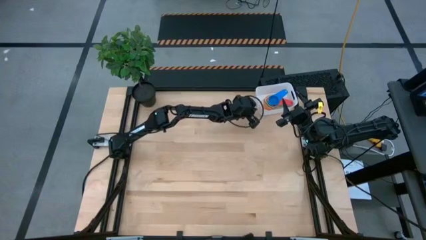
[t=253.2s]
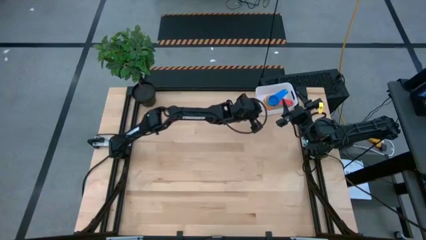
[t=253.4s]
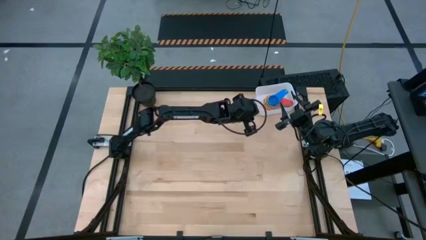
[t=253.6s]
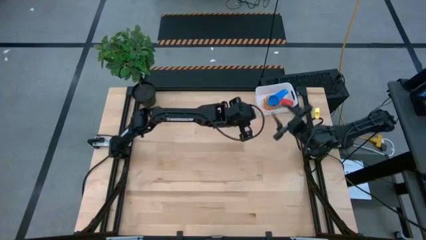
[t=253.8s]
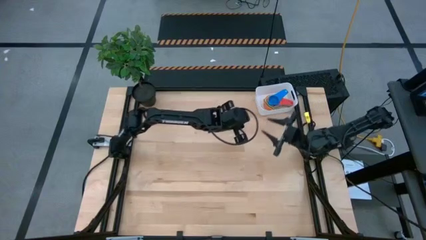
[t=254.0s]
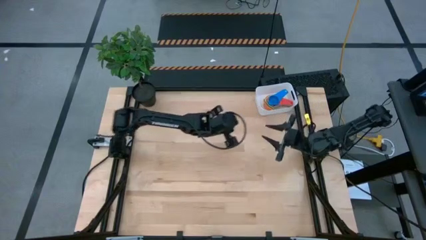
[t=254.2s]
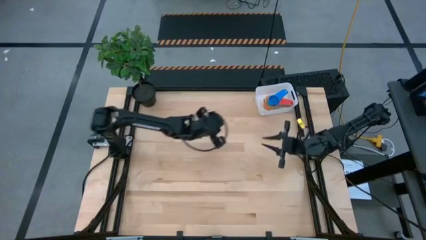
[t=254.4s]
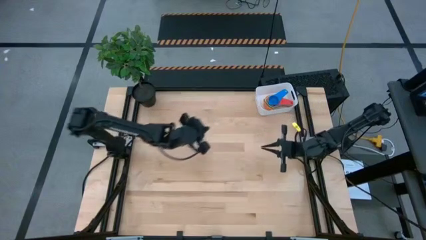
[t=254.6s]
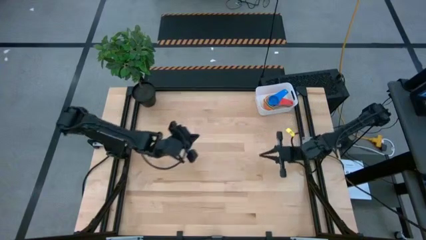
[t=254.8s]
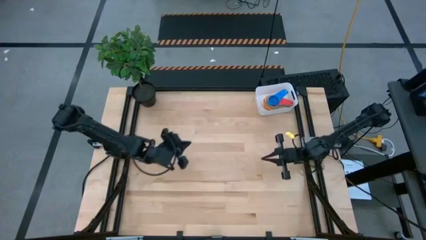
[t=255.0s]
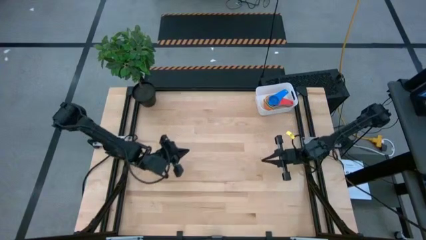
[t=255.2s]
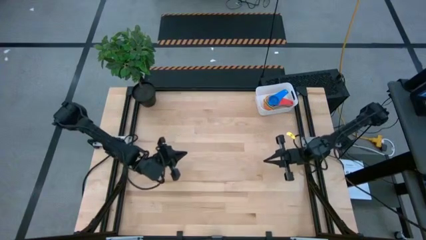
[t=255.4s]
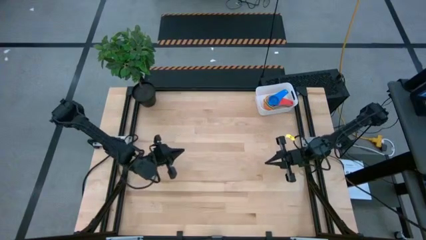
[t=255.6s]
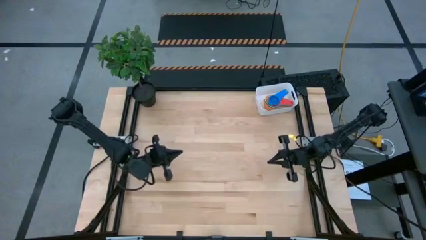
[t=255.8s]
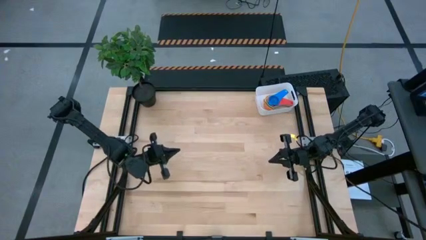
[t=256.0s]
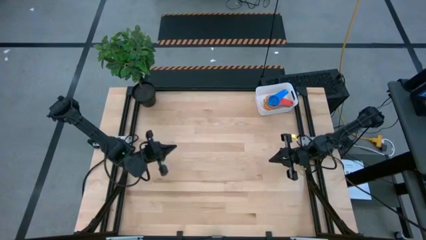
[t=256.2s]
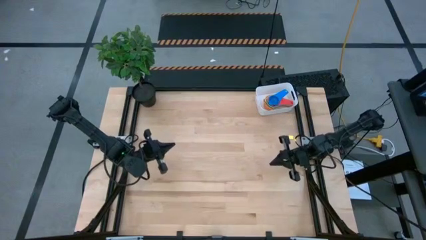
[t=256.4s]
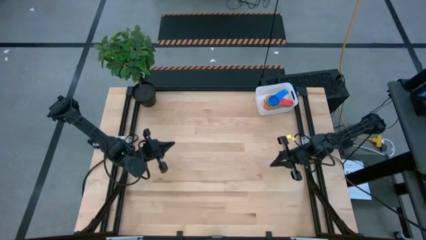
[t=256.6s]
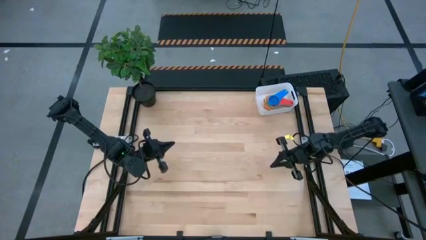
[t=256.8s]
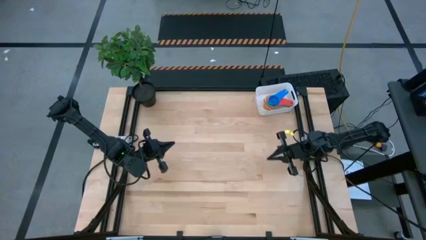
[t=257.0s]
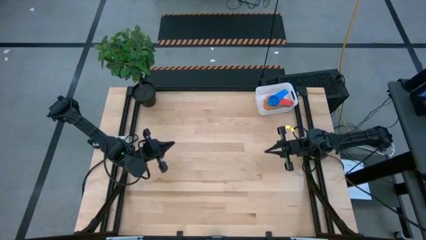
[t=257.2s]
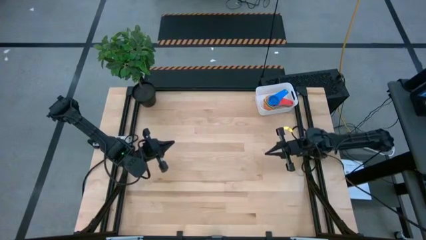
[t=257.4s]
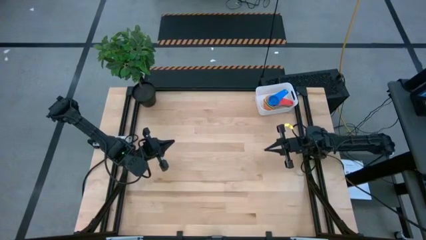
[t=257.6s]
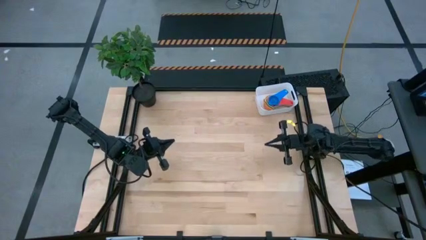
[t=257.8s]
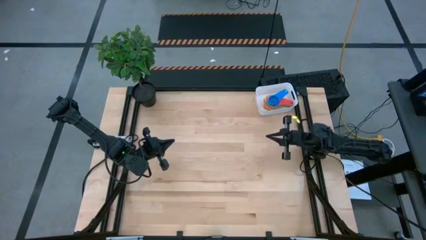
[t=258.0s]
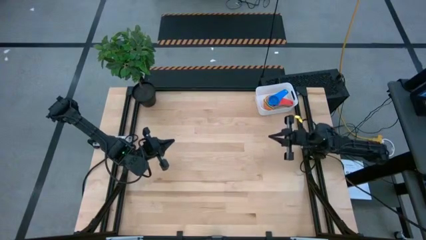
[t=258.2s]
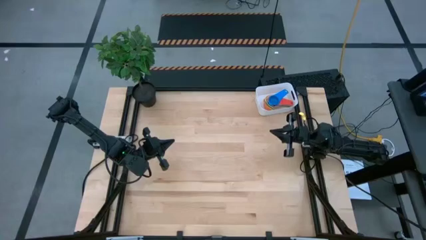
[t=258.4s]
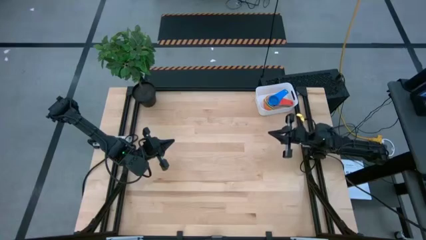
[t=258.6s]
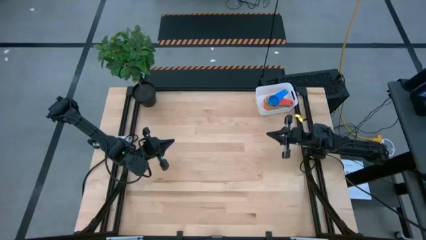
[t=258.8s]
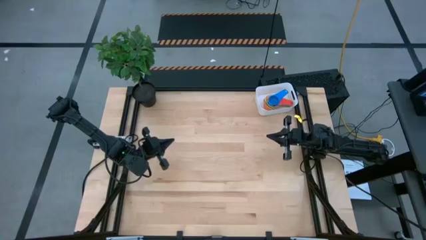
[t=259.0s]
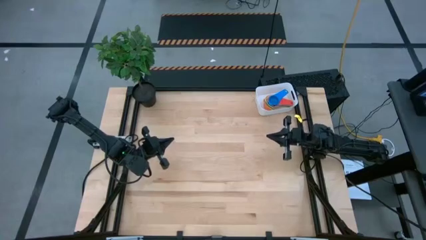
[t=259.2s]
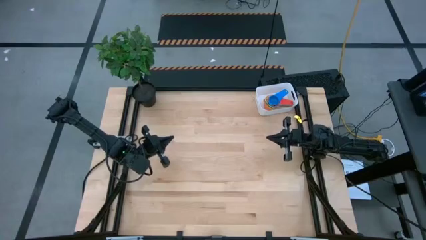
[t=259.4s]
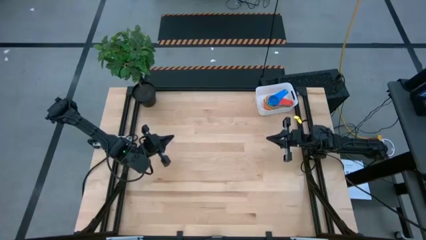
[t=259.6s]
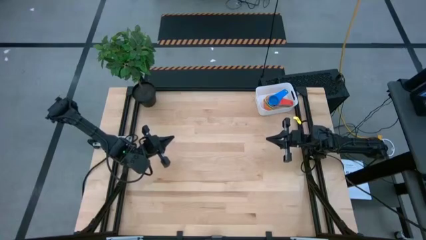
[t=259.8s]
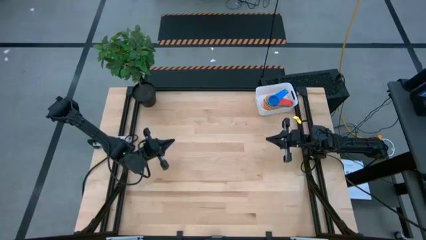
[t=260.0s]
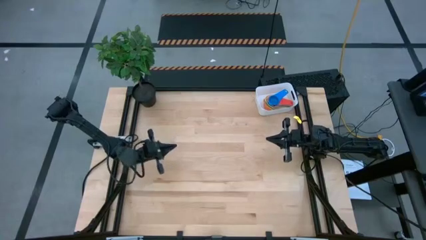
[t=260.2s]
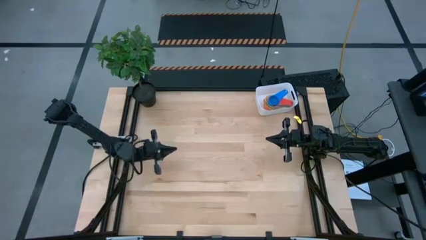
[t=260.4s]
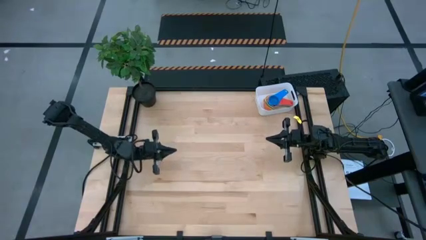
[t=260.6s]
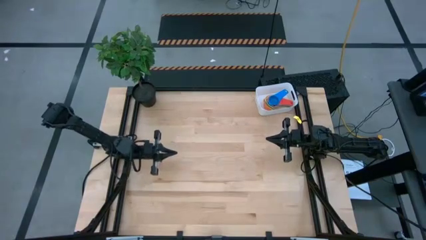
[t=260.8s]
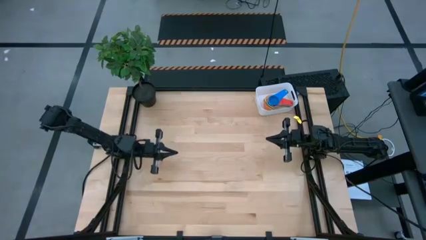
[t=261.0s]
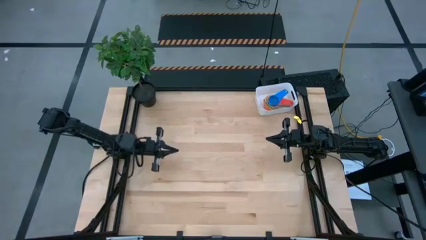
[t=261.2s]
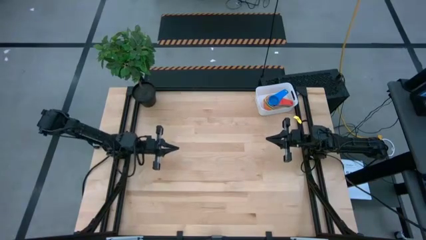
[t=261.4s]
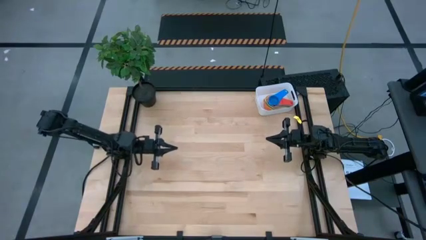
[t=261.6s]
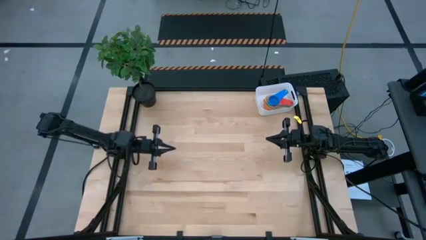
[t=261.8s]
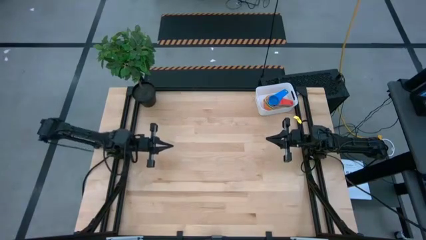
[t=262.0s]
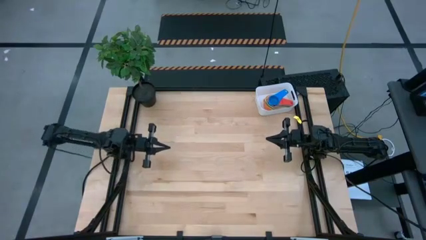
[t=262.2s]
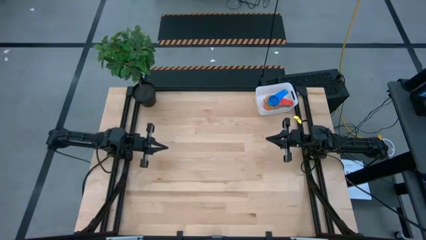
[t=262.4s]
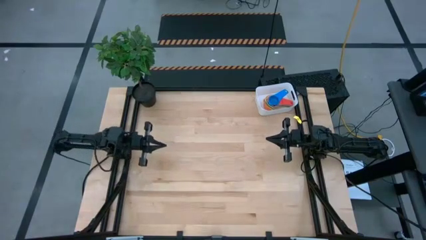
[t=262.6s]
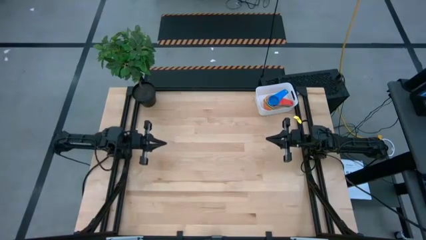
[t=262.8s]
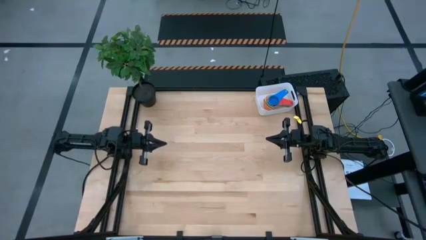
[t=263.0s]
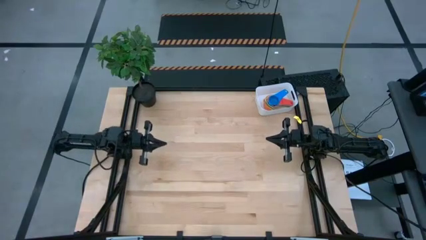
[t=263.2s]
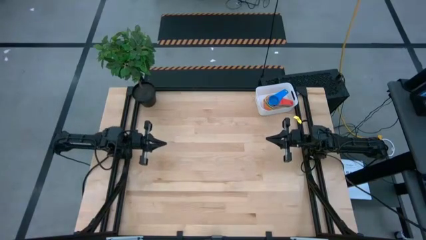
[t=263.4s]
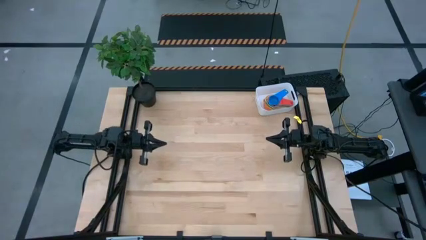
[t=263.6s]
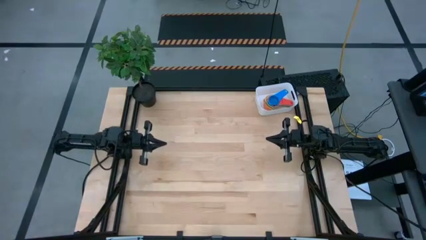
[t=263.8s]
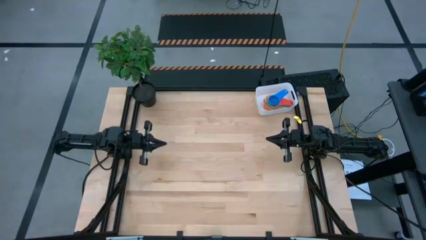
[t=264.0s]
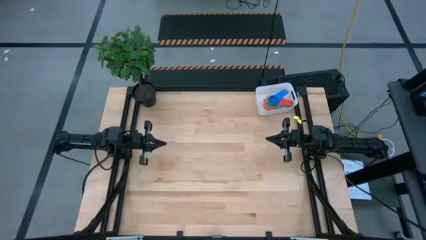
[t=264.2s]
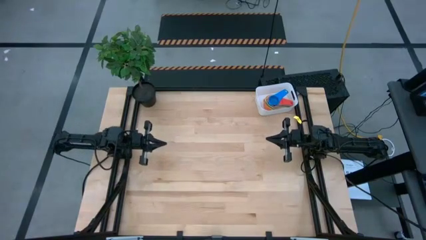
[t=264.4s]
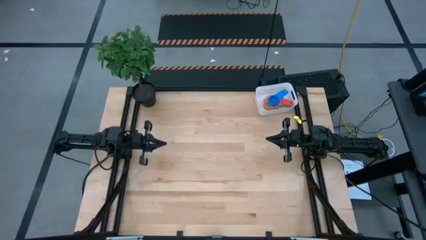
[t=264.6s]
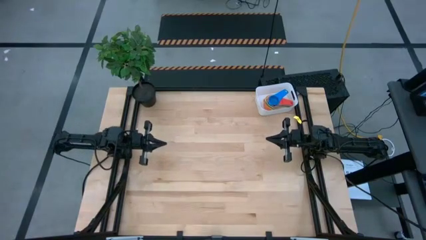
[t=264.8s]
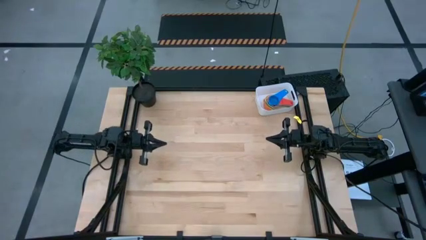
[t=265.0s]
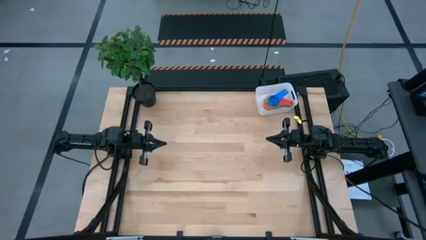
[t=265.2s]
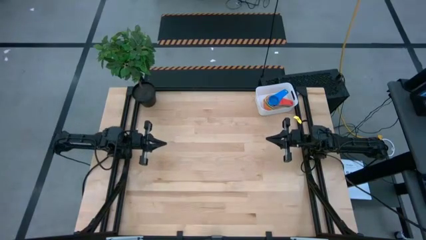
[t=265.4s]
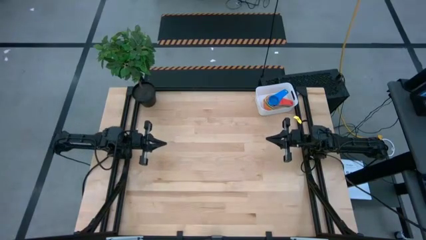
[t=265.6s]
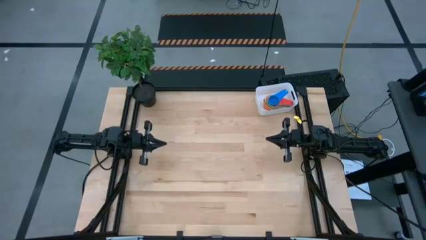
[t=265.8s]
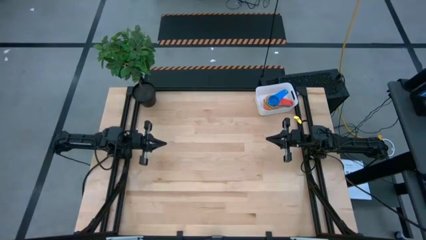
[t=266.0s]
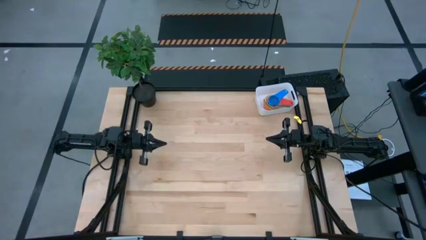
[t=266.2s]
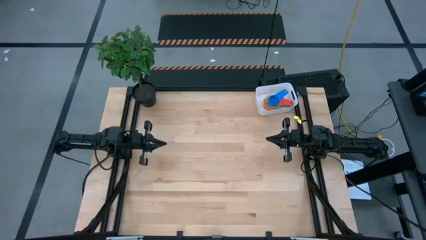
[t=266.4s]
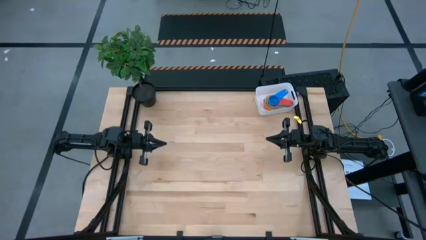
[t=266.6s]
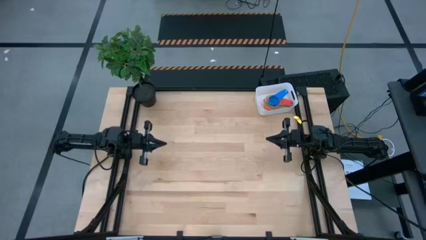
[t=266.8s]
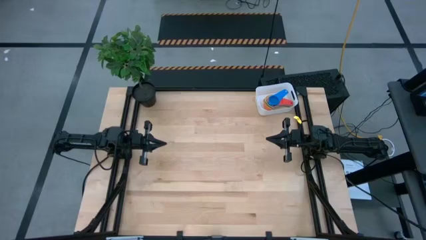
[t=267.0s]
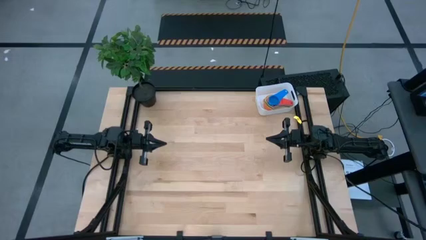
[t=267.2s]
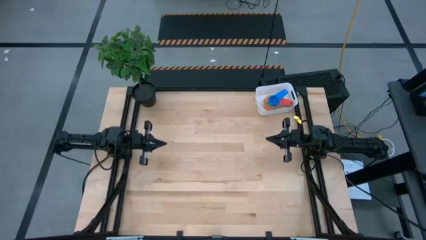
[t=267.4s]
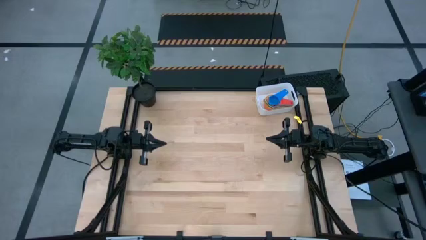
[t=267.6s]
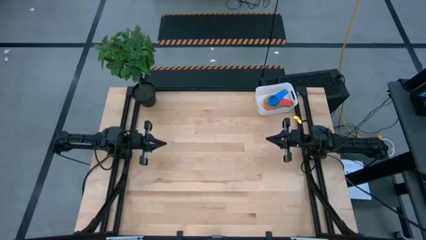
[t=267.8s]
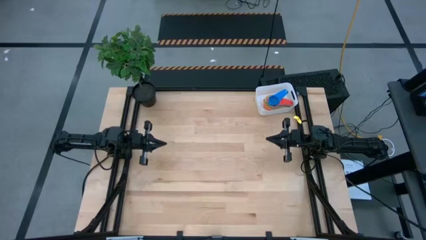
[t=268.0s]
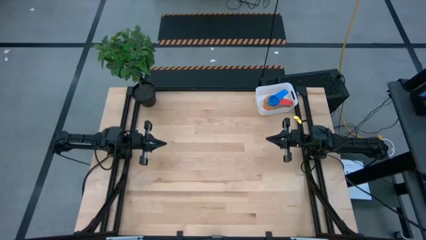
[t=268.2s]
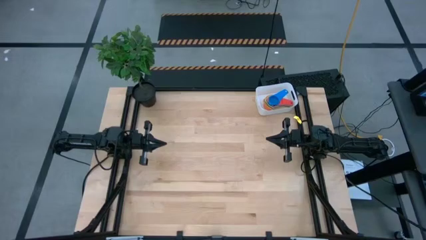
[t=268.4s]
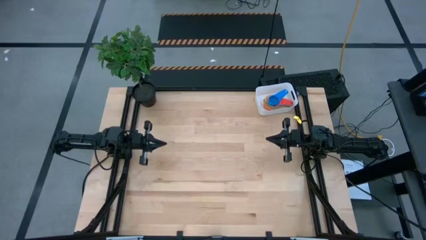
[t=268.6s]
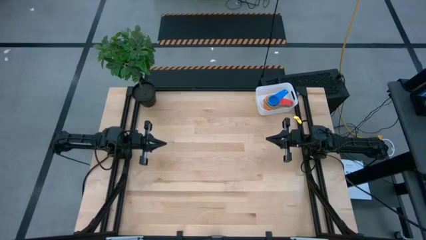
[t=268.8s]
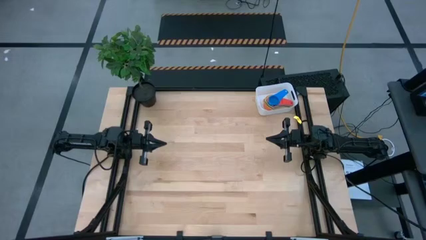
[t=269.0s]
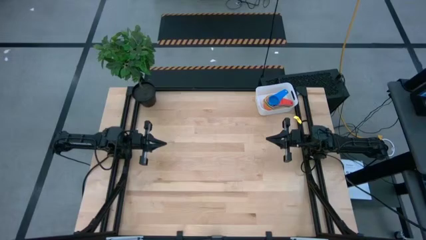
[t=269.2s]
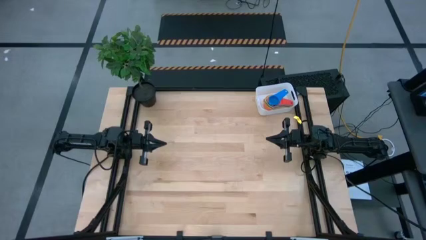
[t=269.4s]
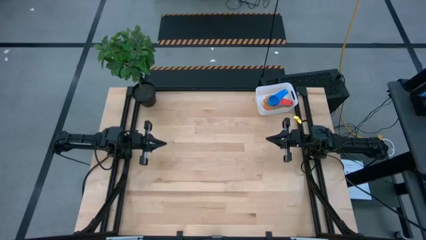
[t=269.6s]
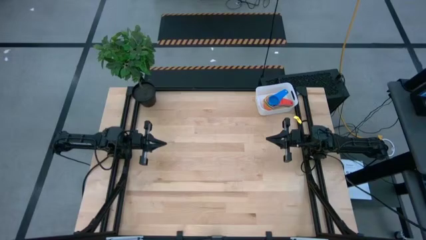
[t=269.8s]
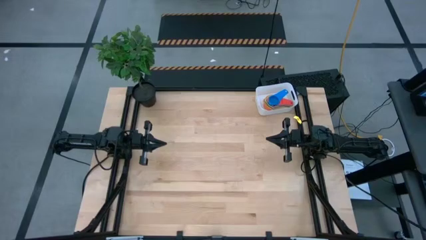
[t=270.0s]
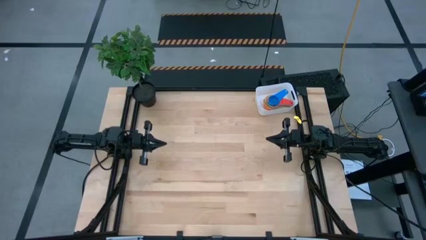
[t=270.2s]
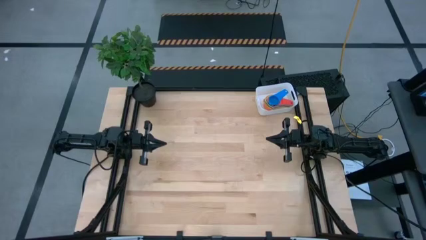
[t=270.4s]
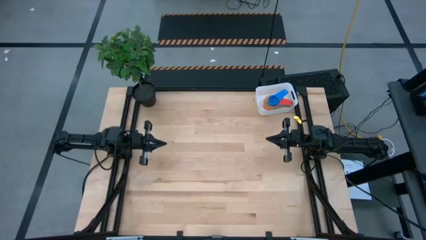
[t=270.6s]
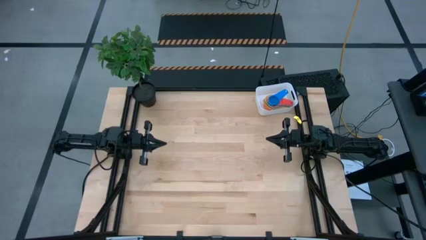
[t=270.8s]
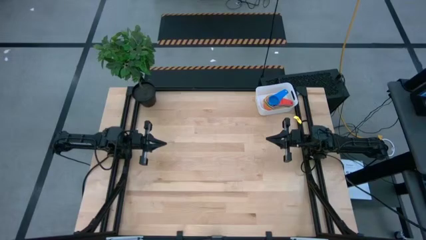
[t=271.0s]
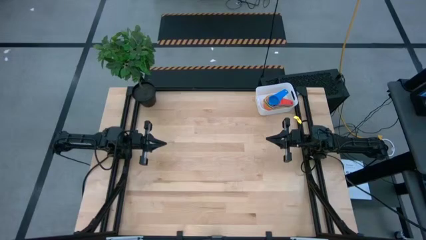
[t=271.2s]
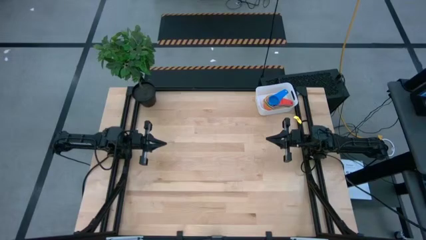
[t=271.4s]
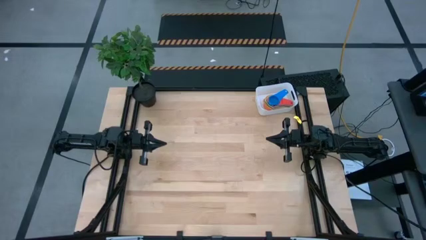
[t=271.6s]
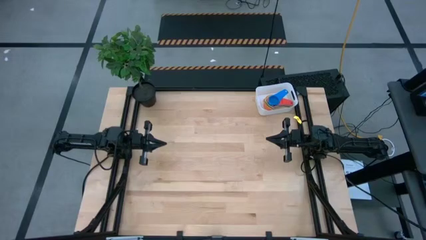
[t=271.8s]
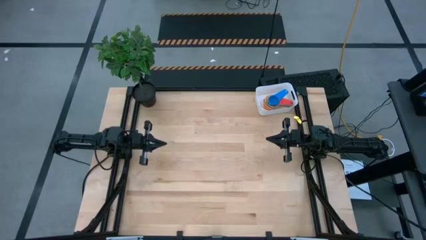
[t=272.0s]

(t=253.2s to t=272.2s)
Task: Nest measuring cups in basket
Return to Home Position
